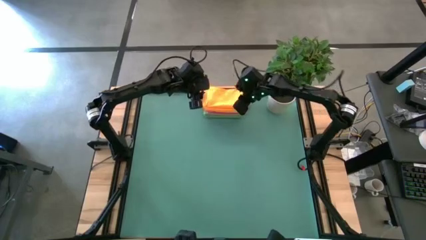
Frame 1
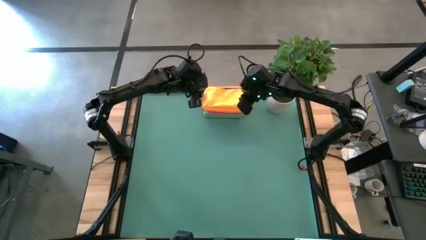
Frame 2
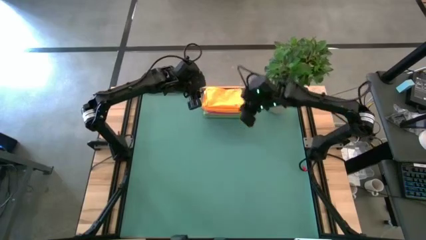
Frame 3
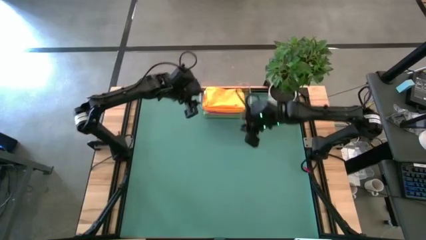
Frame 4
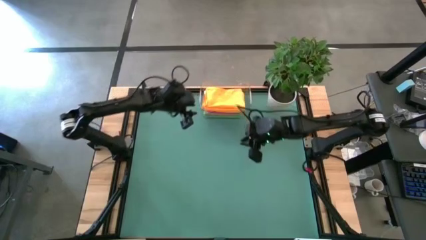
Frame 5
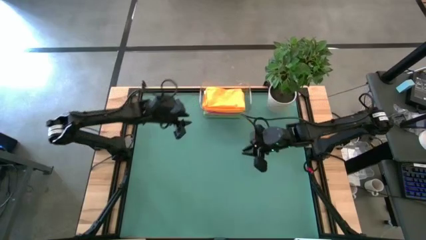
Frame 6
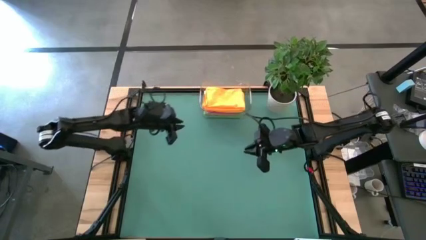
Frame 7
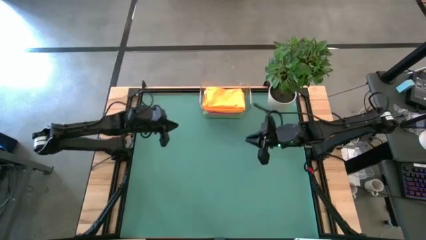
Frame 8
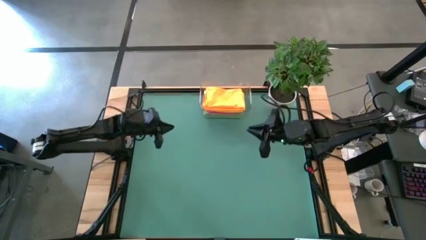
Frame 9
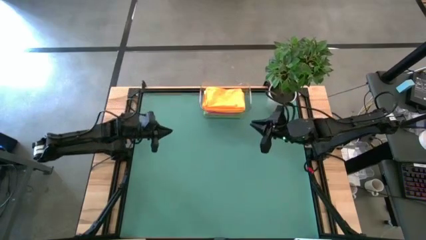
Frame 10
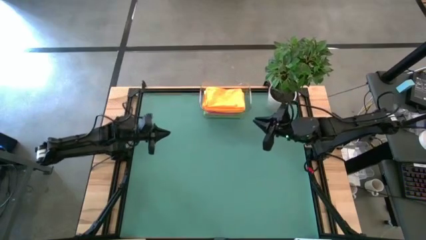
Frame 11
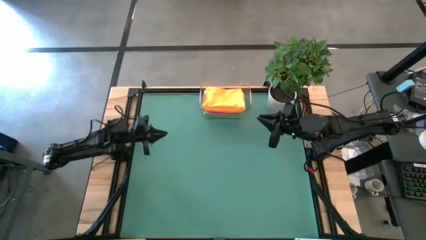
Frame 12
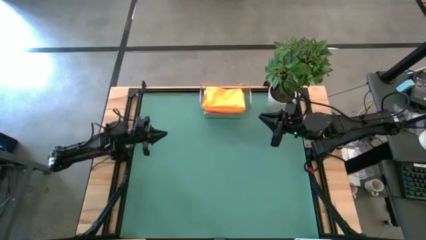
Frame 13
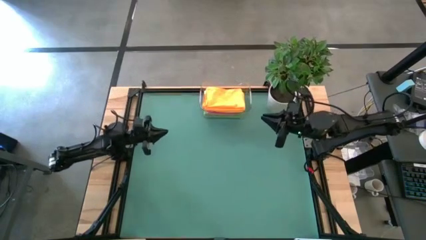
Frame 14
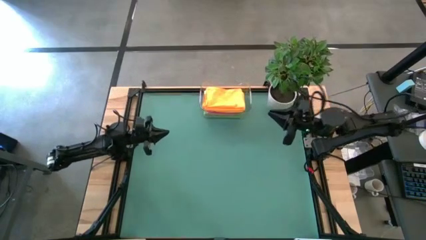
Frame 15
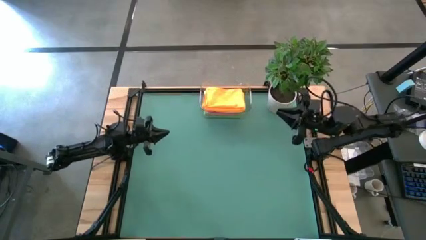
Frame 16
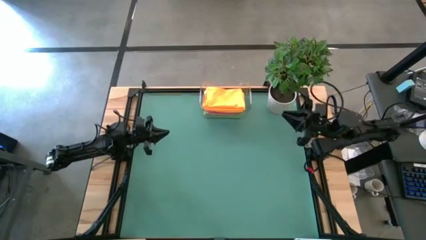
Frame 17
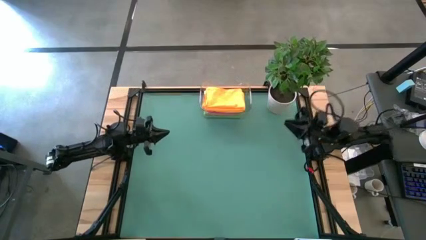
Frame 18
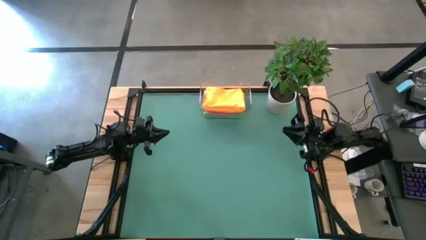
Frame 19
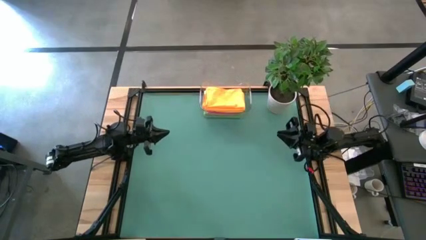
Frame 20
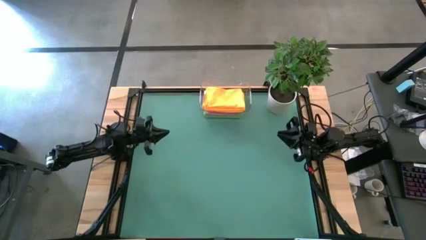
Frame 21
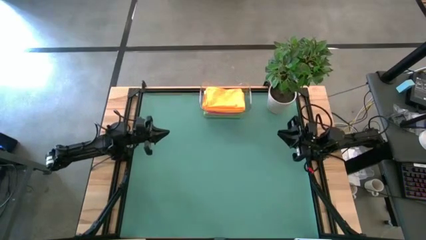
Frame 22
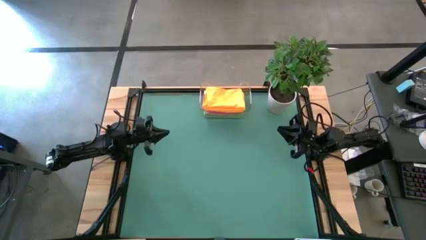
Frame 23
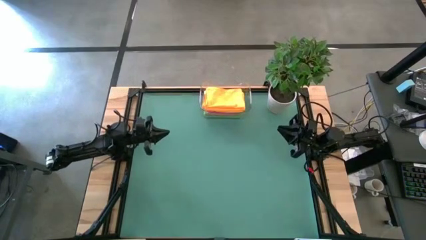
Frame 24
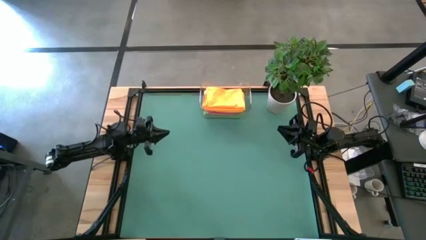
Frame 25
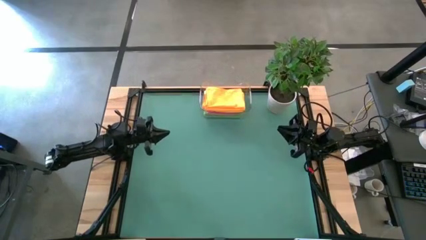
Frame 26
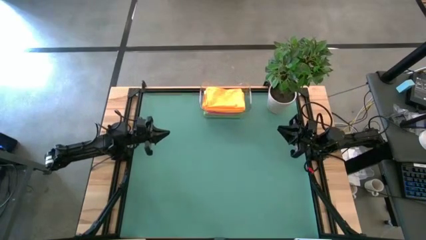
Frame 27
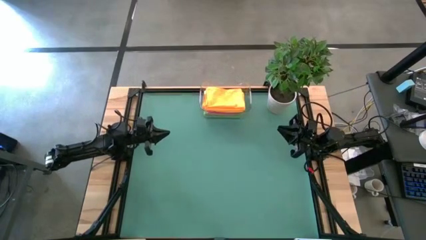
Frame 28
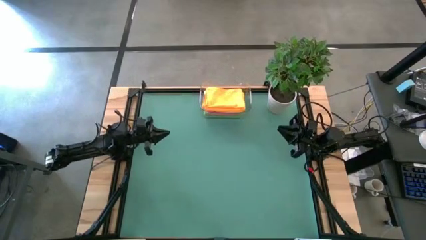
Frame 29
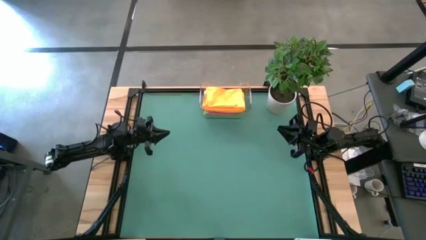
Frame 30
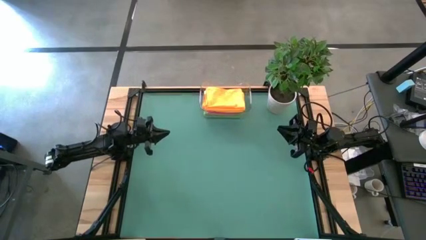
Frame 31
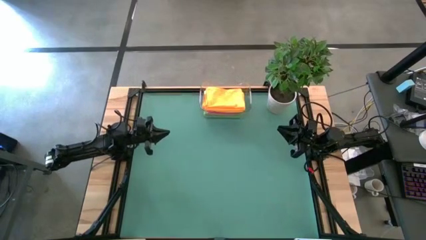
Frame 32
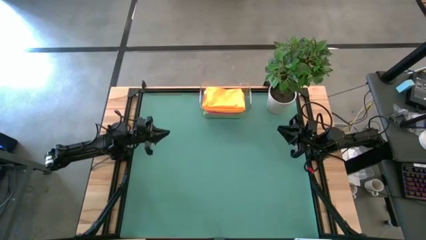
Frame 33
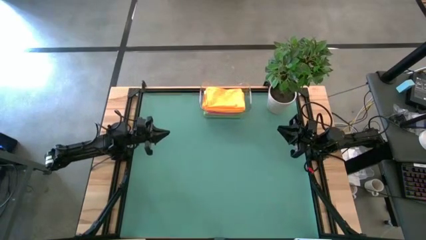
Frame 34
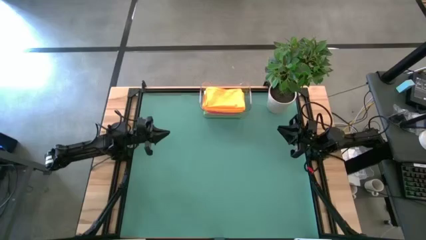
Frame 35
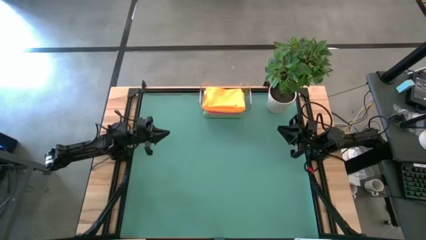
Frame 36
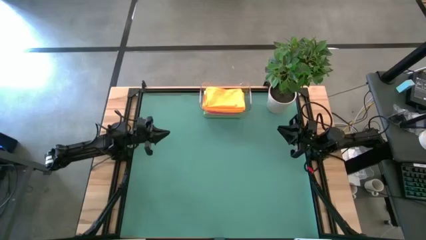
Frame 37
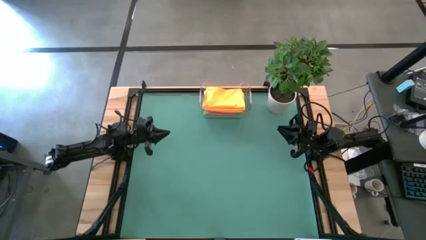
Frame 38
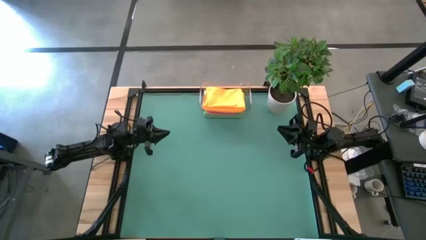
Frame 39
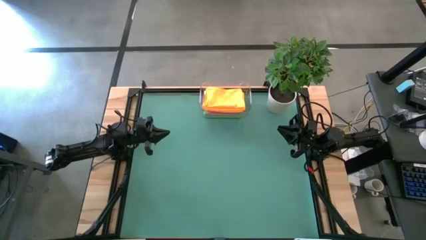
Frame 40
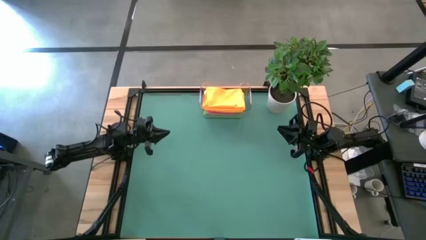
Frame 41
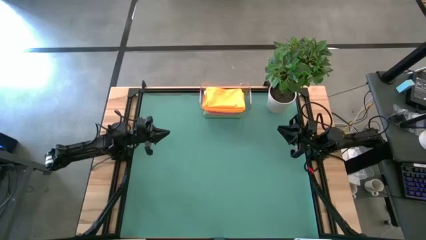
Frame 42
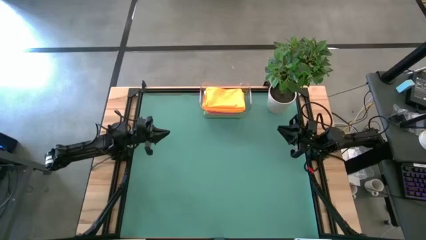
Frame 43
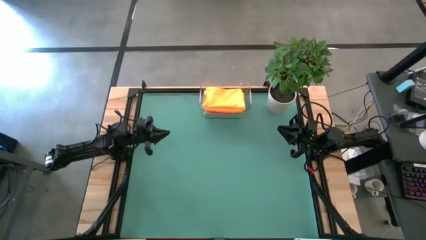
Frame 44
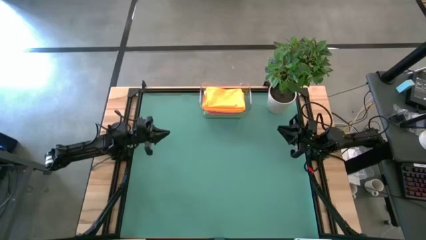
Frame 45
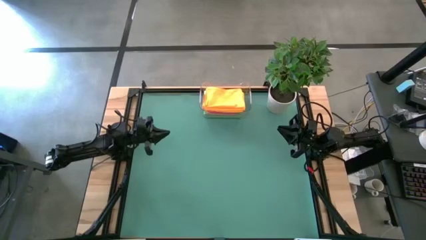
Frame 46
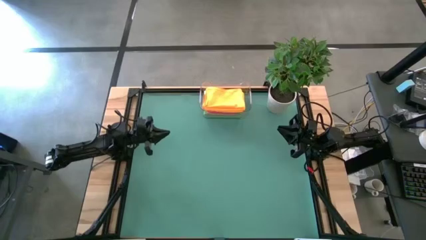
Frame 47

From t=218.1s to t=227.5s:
Task: Fold microfiber towels
Return to Home Position

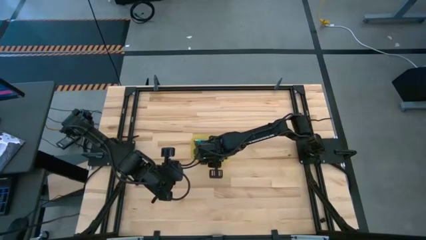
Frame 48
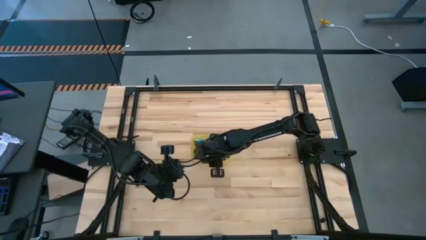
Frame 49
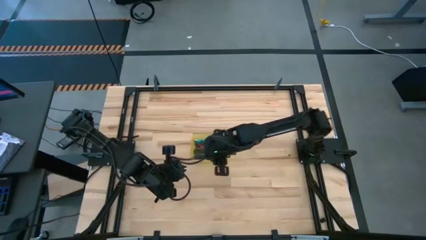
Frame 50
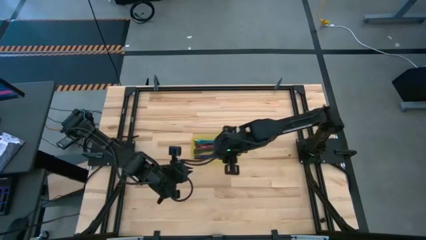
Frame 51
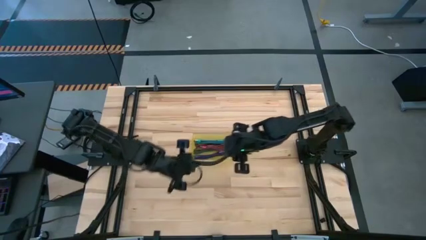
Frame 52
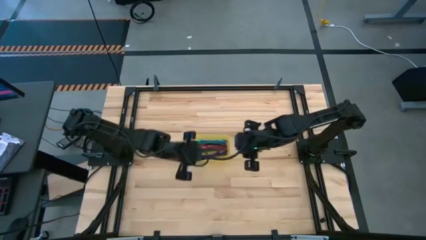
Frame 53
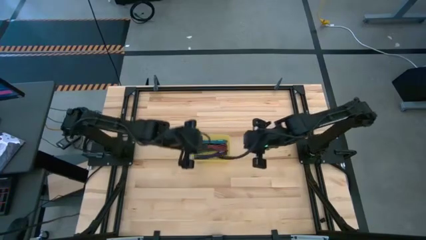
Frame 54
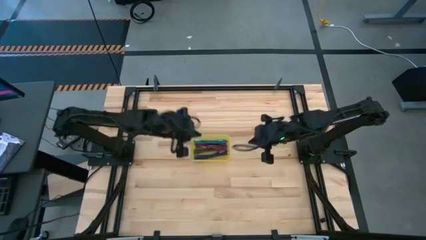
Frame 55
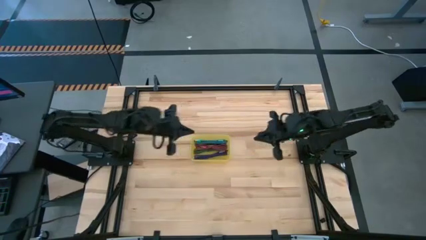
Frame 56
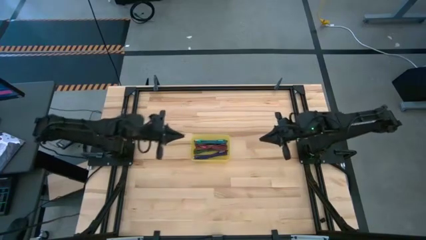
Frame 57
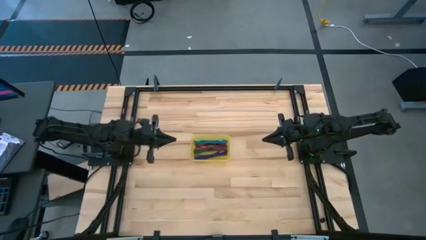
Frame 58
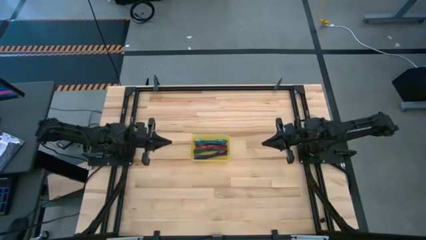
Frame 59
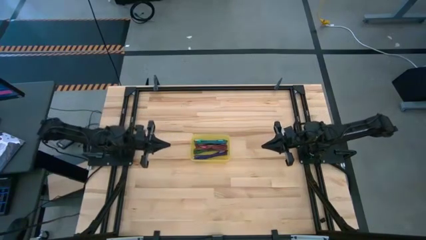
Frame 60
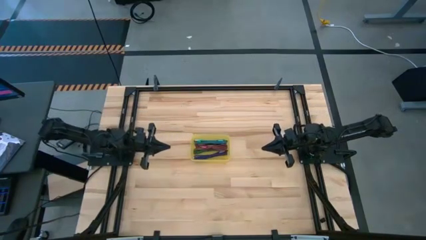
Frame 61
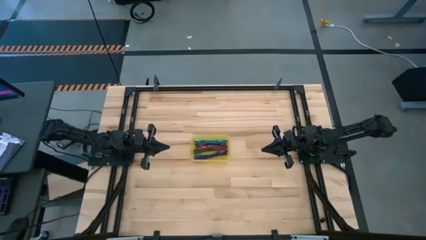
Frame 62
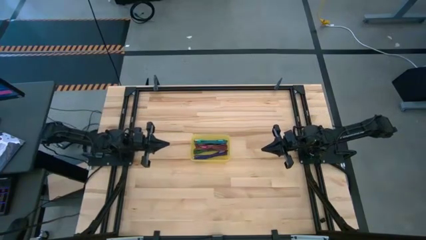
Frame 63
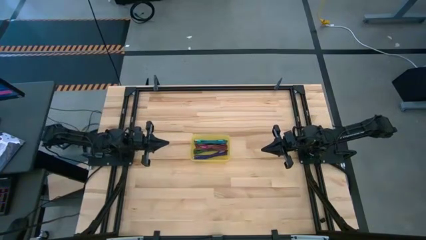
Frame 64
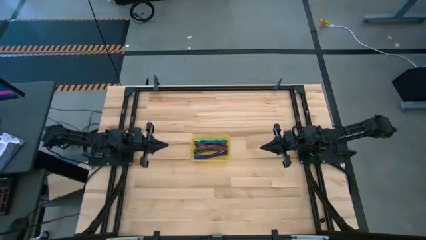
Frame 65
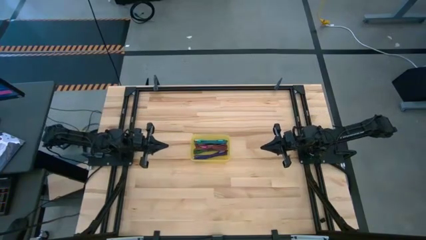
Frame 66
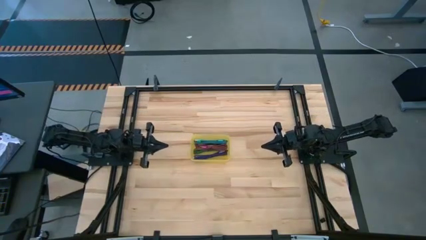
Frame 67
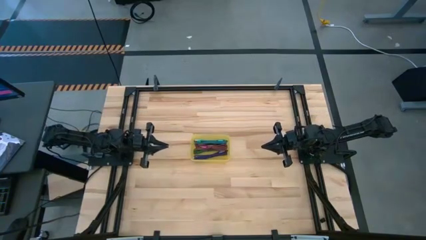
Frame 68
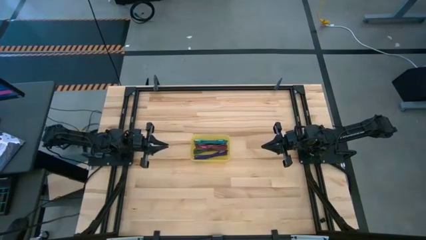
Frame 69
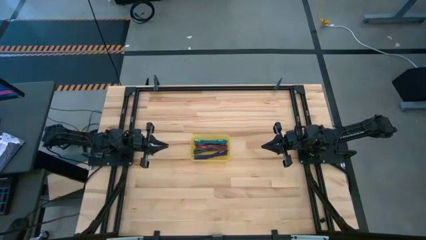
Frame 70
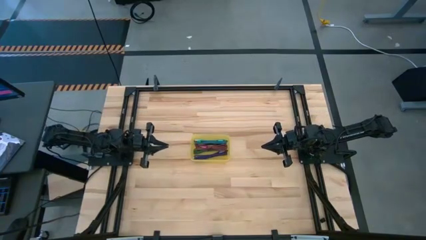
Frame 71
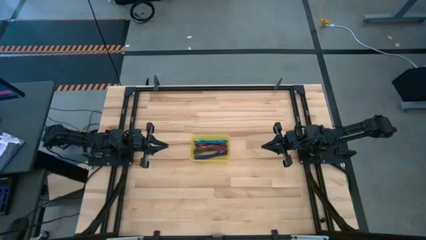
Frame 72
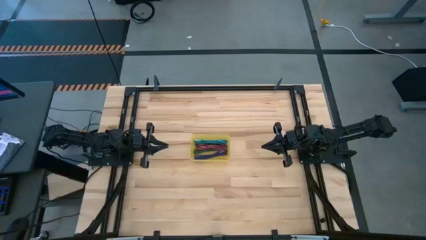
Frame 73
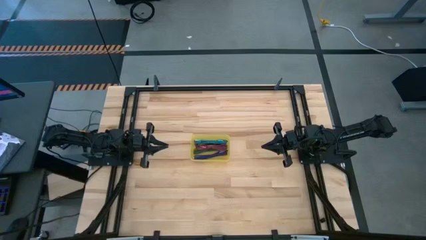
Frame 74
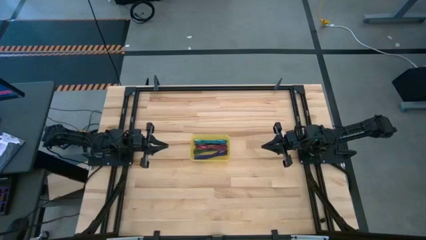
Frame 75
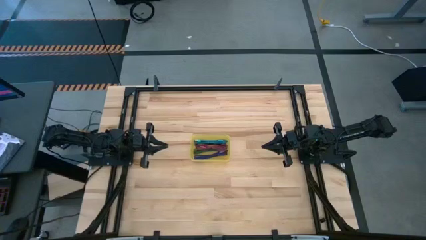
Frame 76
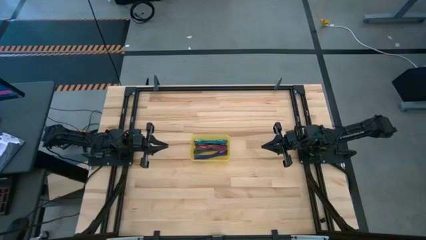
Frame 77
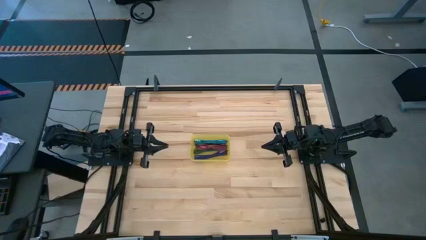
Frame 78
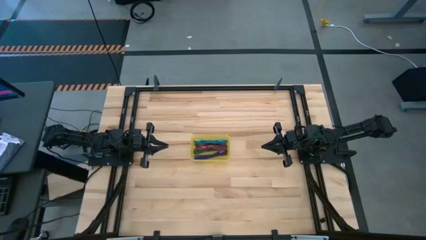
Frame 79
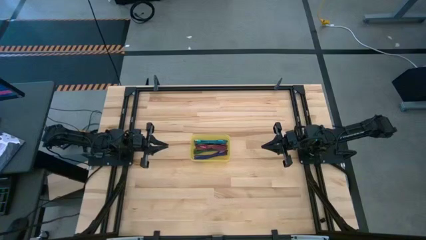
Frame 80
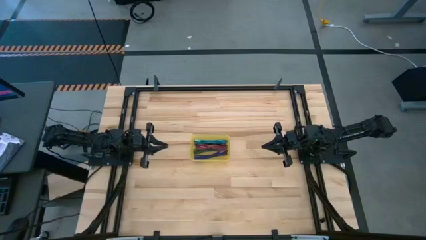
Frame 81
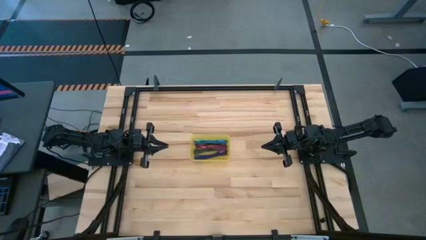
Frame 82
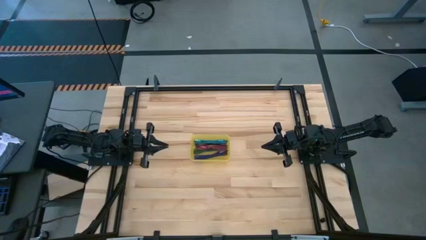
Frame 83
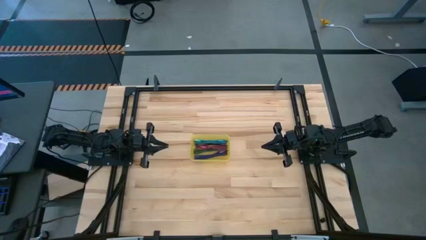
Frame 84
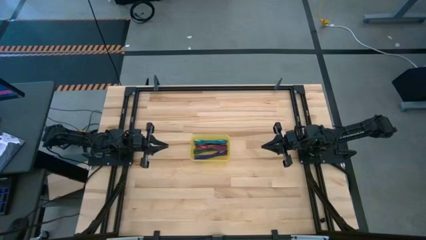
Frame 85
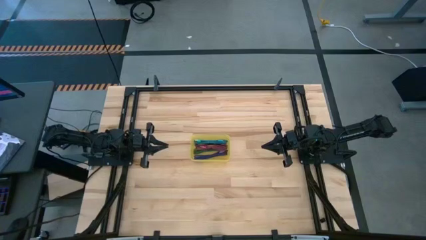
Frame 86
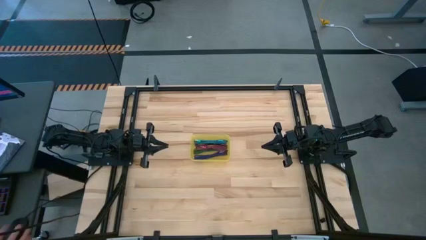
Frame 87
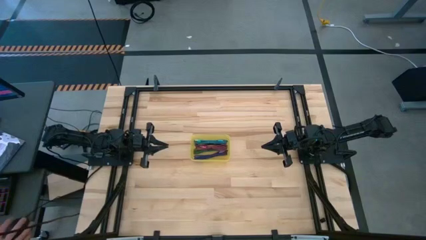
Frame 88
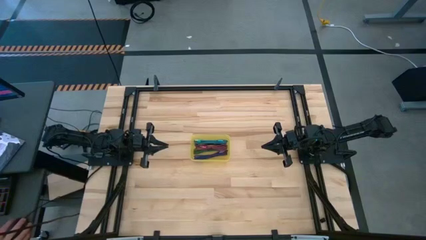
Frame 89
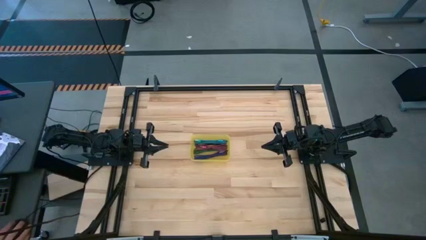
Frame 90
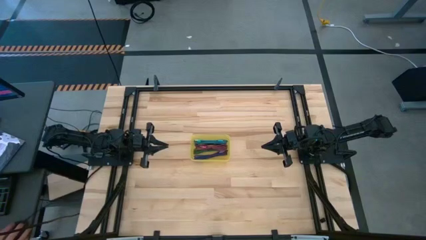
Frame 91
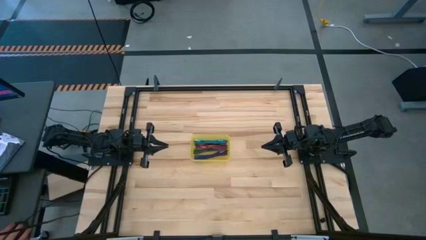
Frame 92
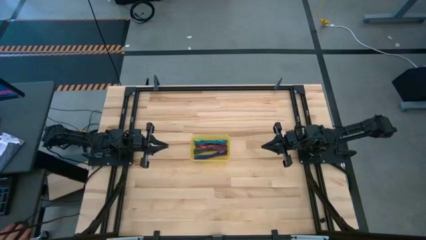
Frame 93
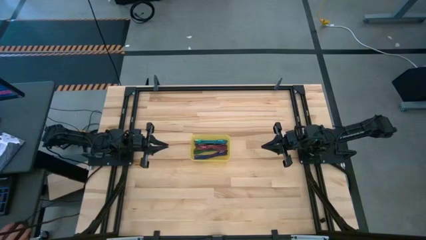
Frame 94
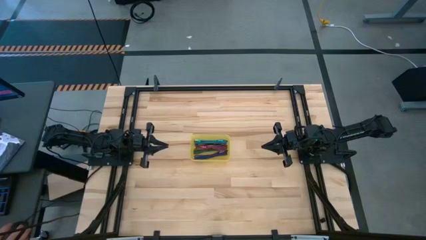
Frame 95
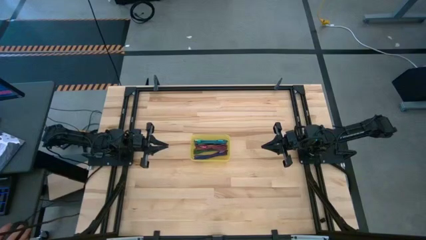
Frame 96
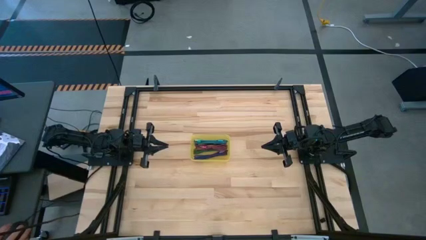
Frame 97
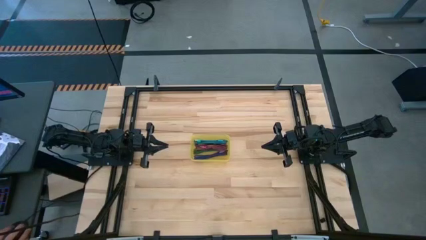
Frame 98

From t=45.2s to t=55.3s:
Task: Pick and place USB-C Cables
Return to Home Position
